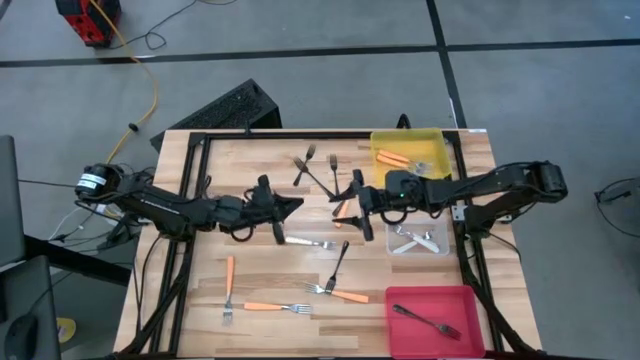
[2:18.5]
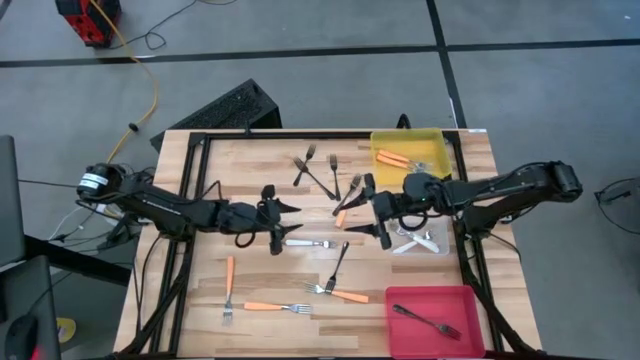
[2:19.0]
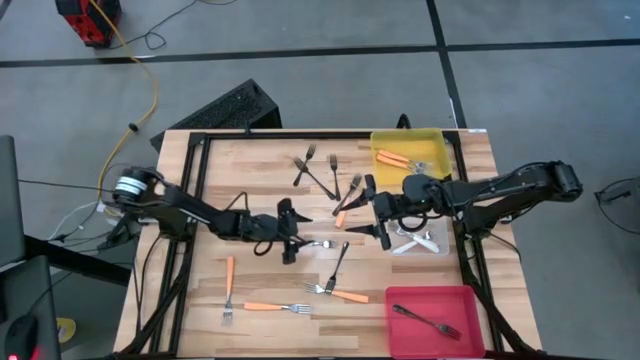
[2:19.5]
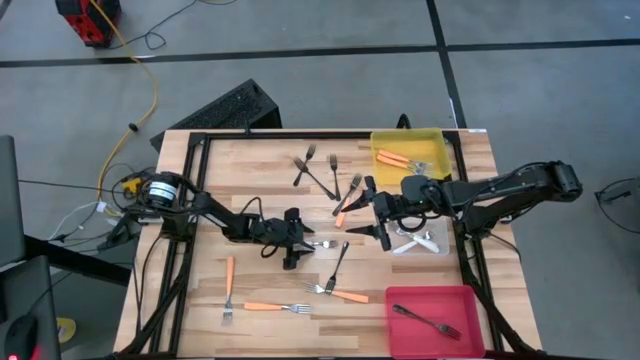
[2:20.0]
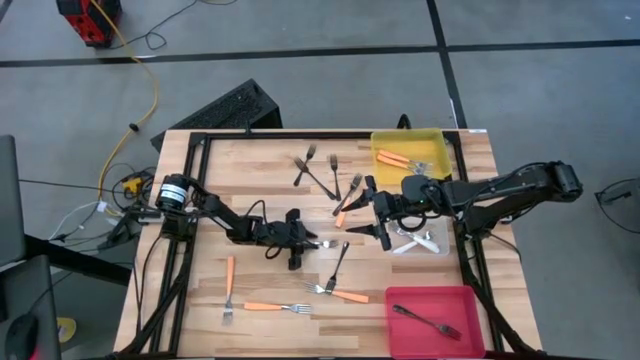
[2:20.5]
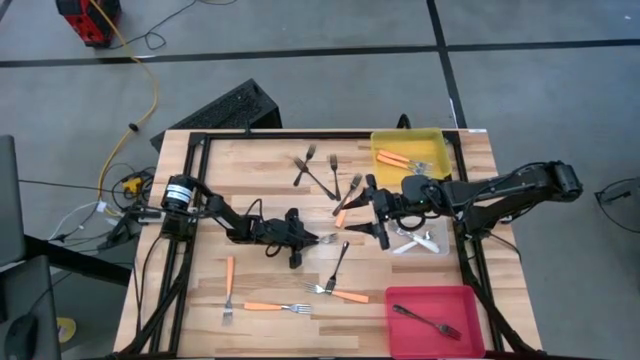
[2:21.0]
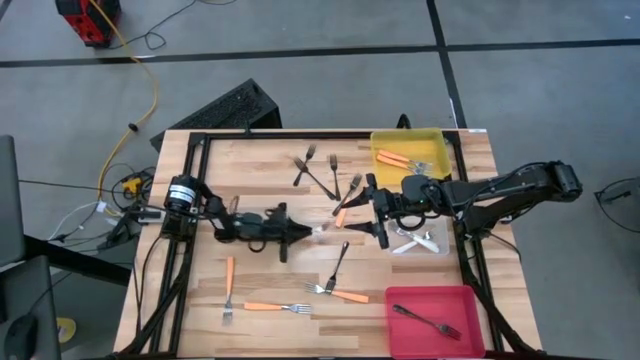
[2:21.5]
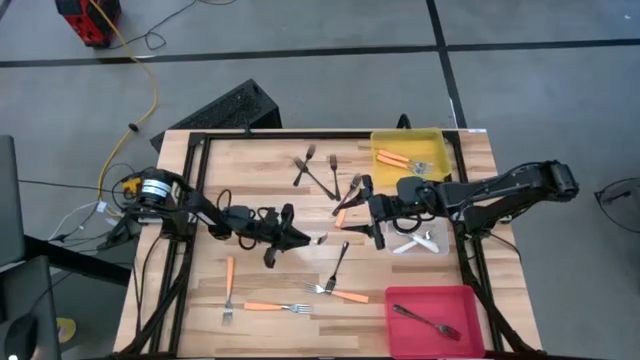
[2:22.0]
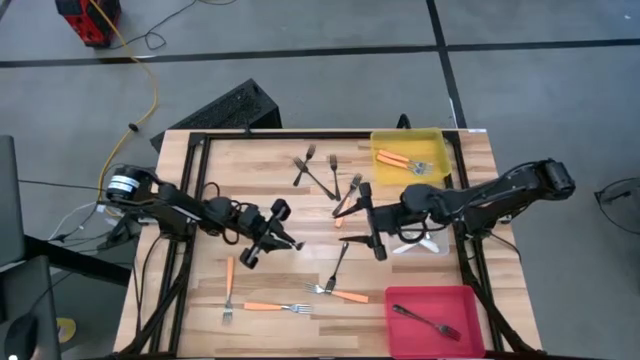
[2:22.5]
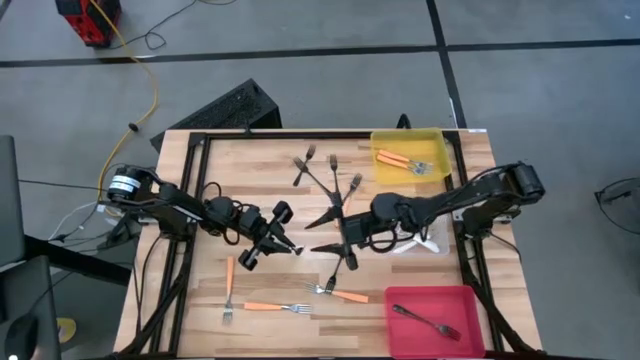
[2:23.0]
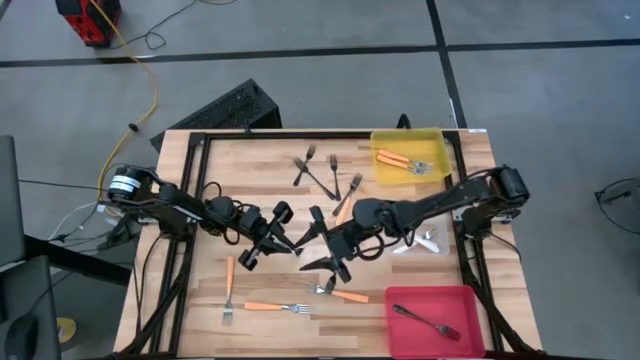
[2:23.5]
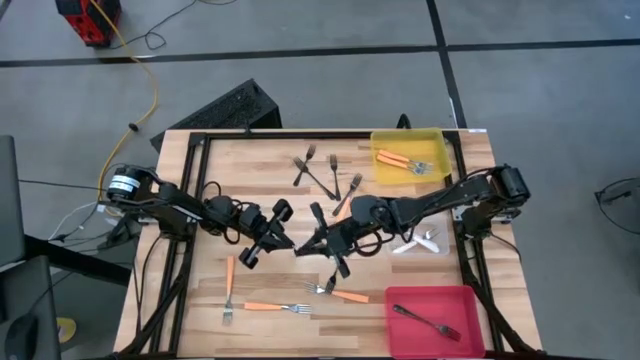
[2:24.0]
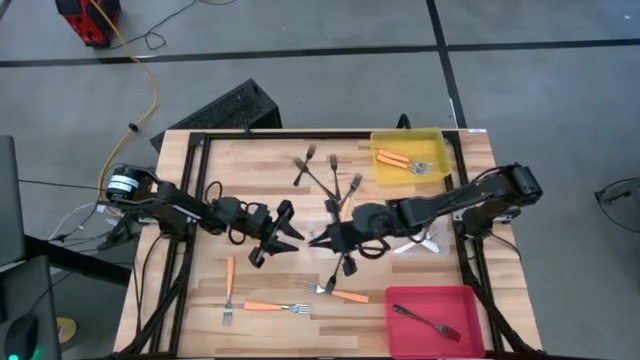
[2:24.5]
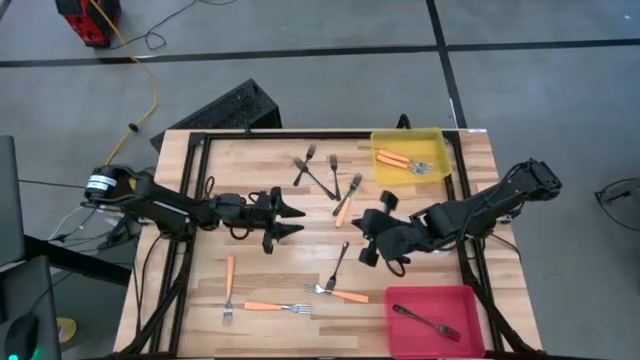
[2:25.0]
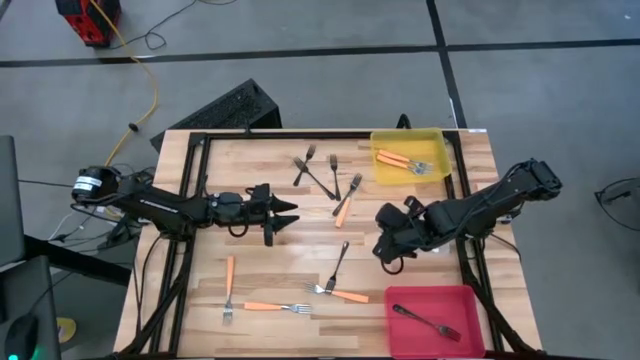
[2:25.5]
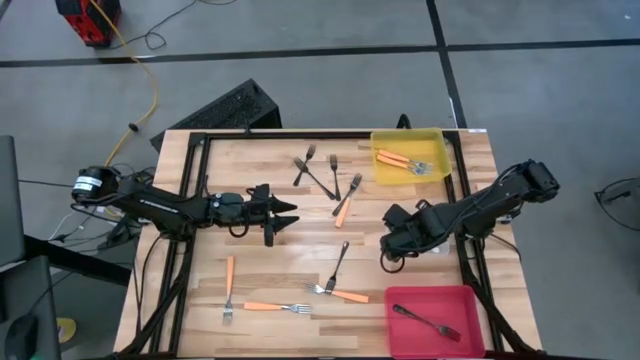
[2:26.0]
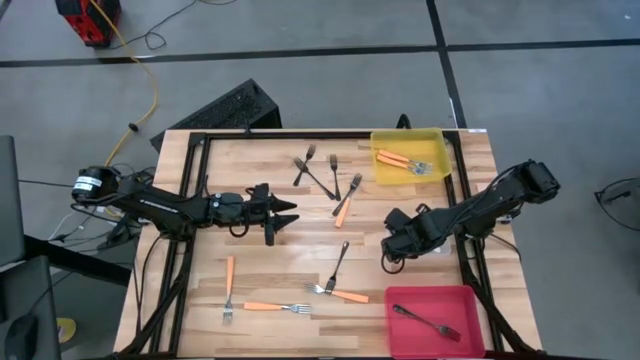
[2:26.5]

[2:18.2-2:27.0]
Task: Sort silverware by color (type)
Put the white fork into the transparent bin

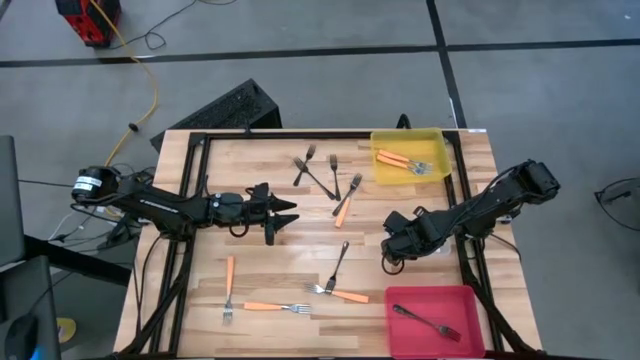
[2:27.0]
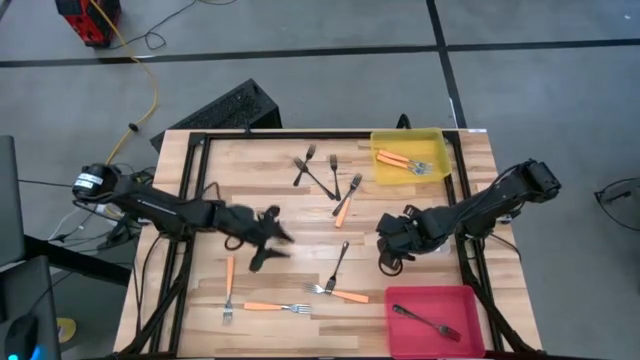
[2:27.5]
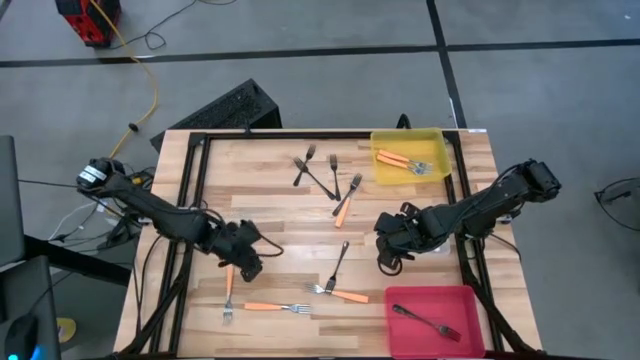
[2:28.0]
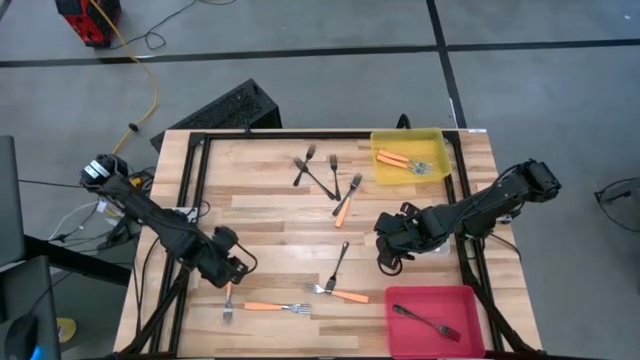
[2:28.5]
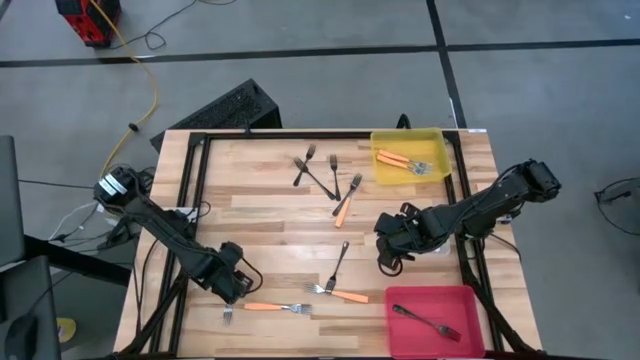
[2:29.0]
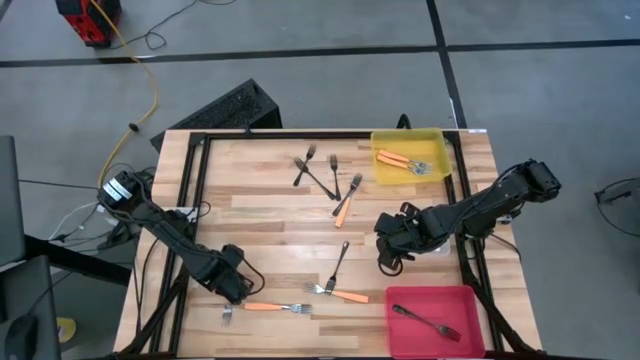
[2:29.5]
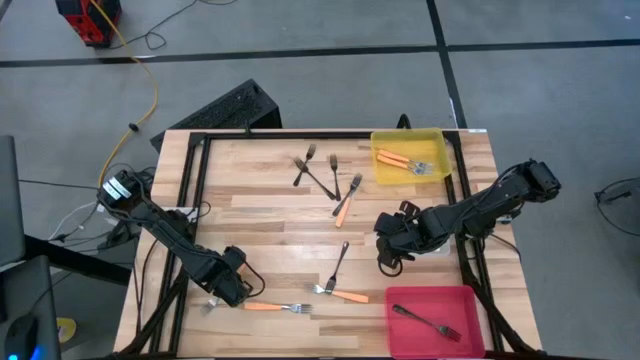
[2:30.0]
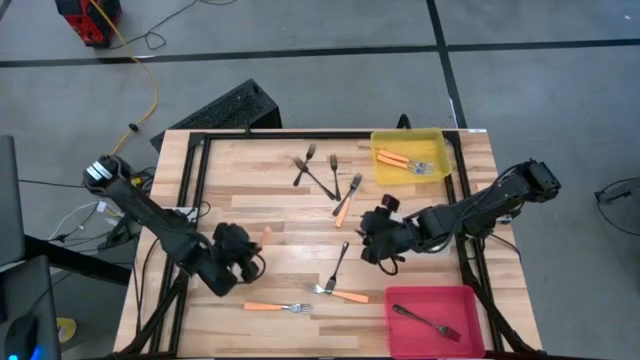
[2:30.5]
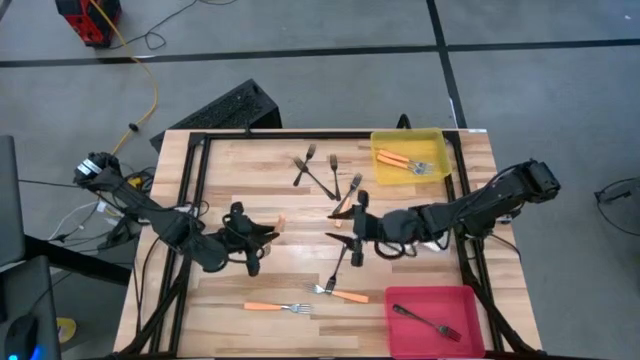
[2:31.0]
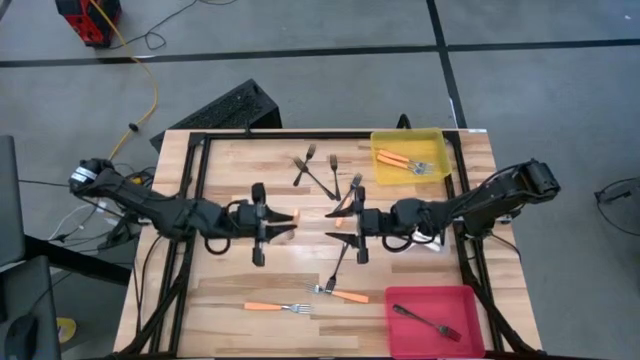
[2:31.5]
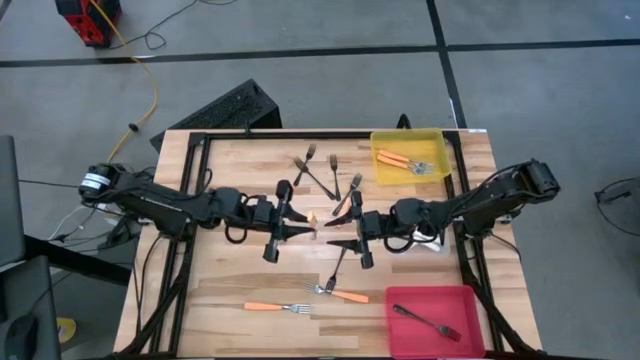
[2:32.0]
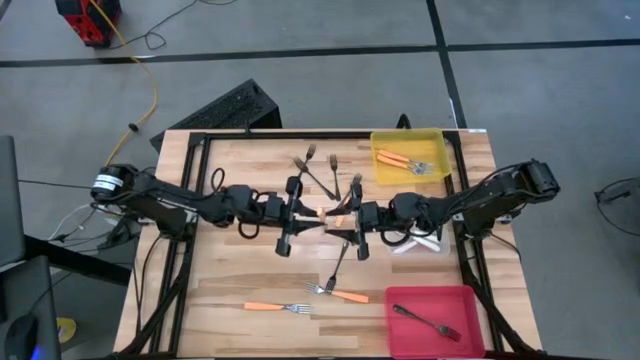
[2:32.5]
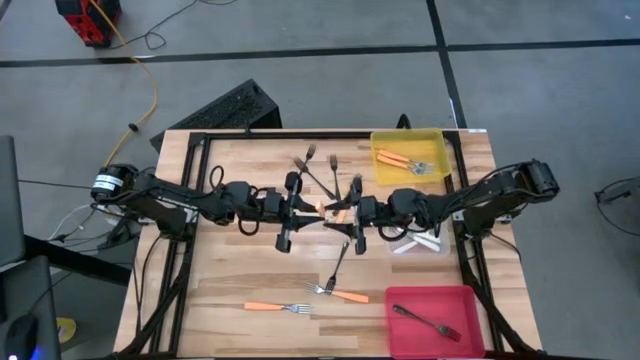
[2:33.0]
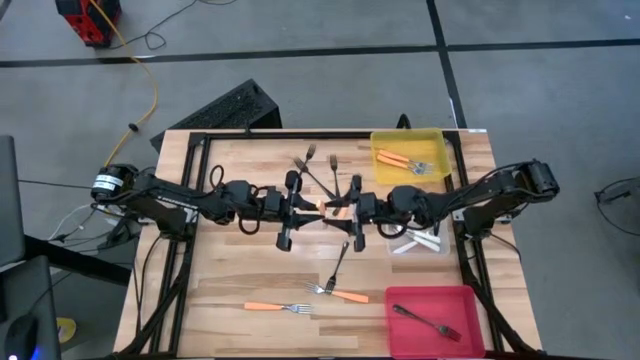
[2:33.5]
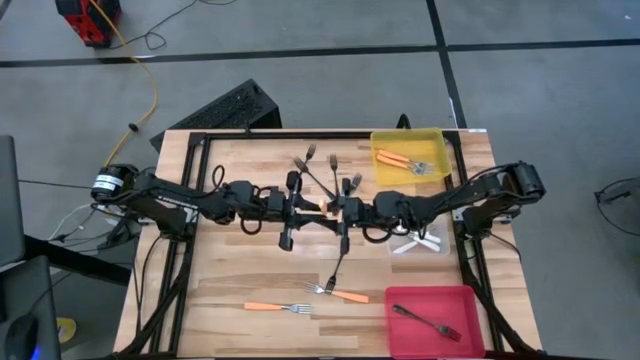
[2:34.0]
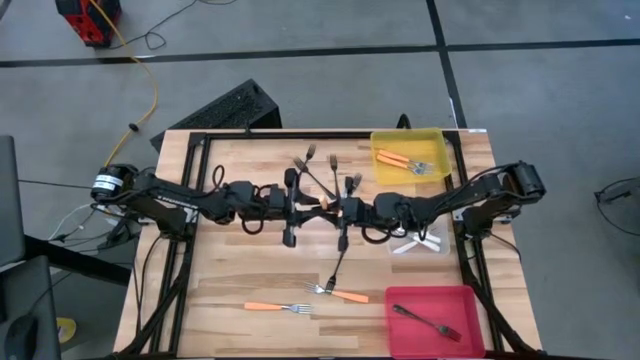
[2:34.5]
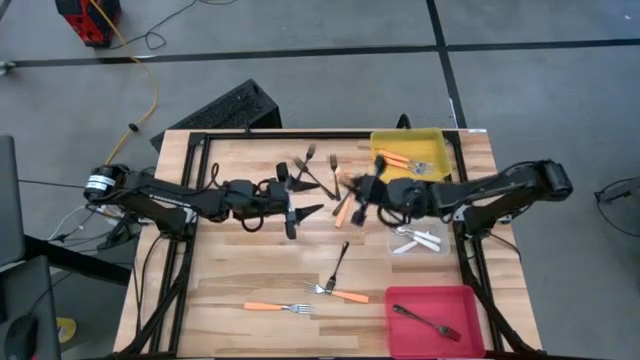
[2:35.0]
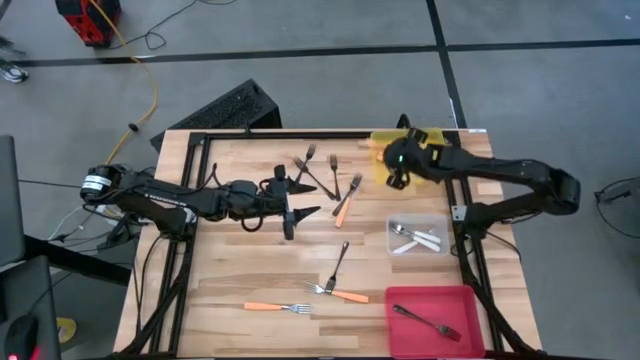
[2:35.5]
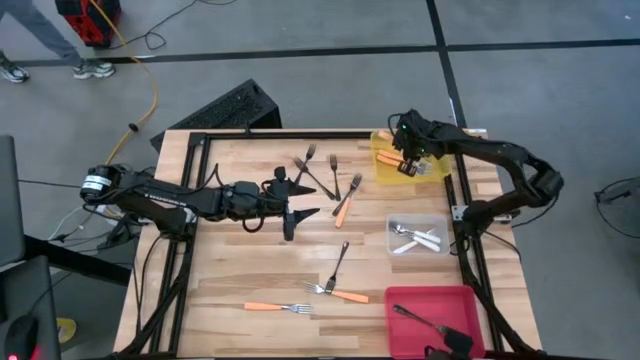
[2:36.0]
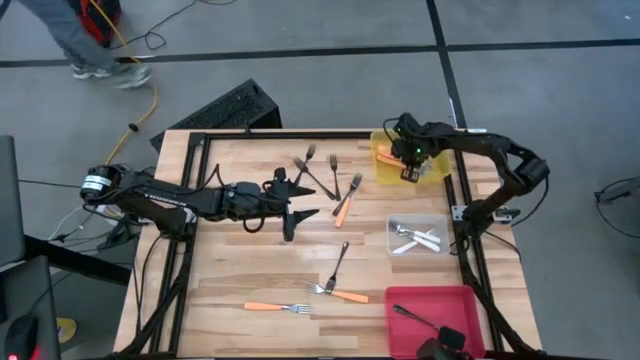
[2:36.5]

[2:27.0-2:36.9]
Put the orange fork into the yellow bin

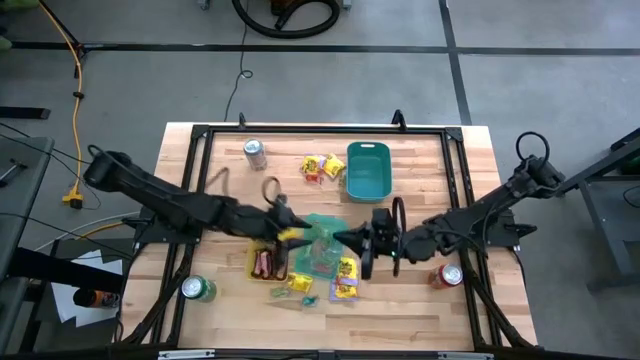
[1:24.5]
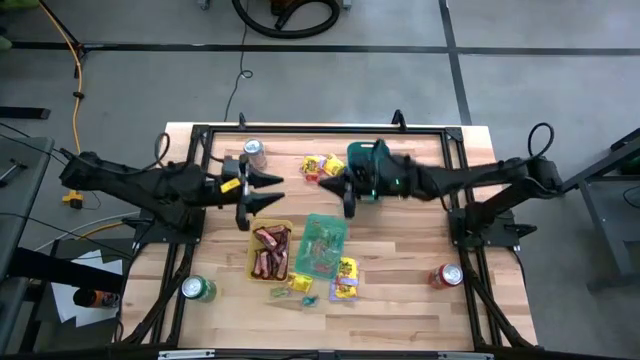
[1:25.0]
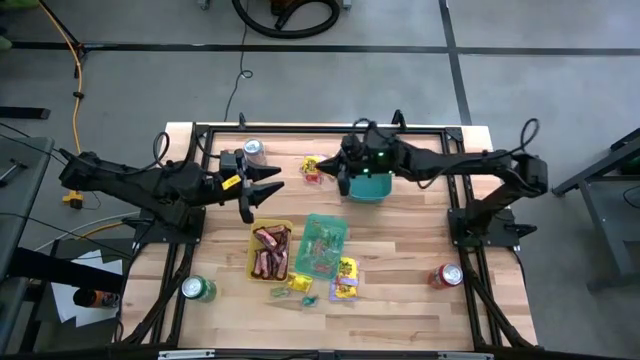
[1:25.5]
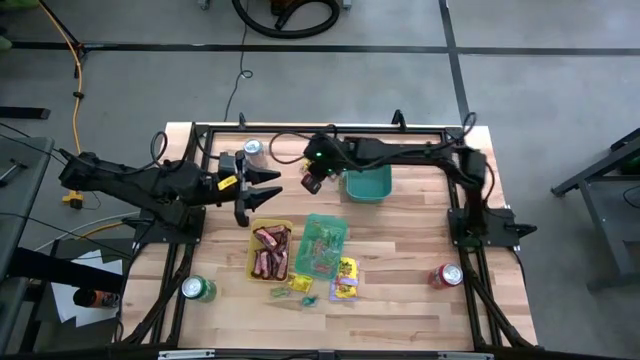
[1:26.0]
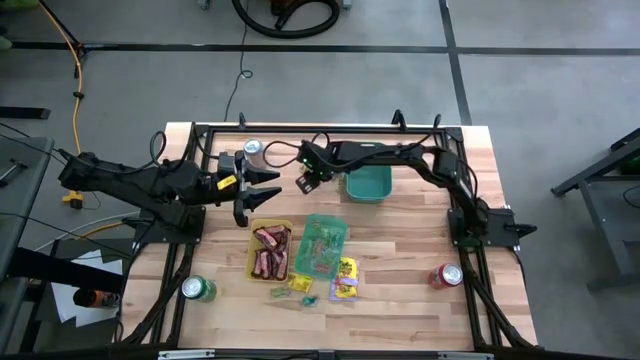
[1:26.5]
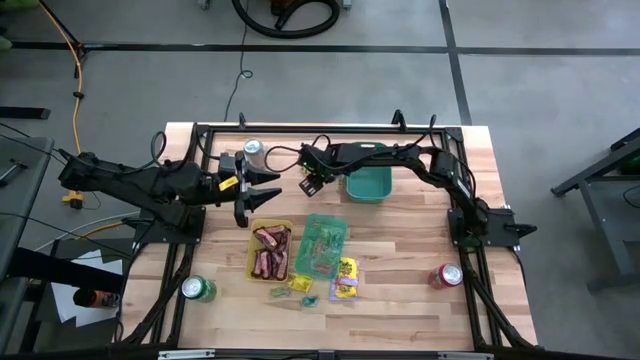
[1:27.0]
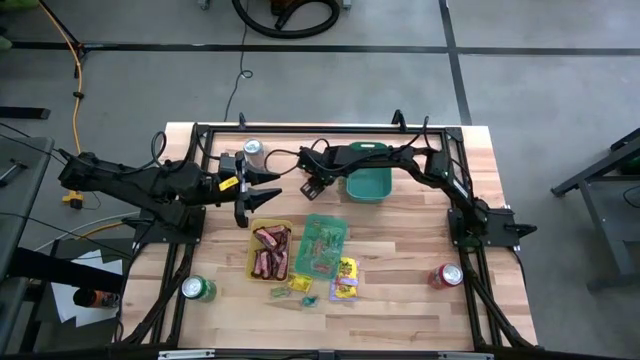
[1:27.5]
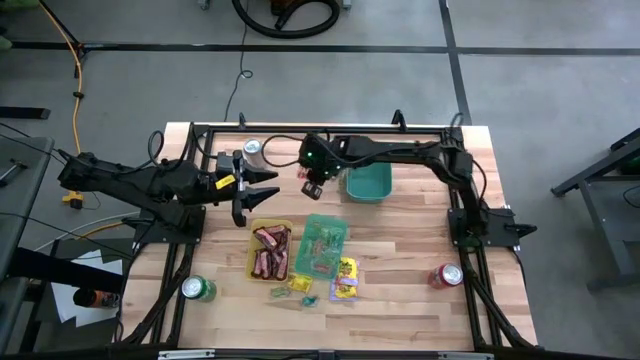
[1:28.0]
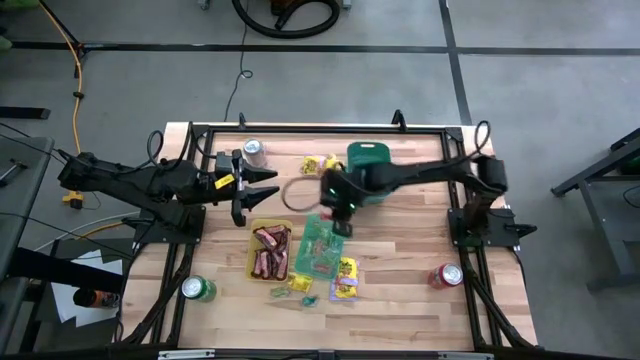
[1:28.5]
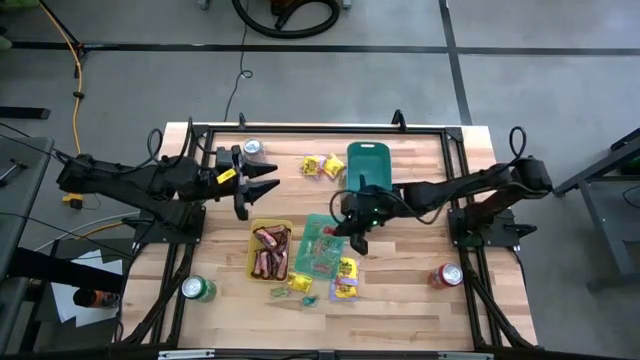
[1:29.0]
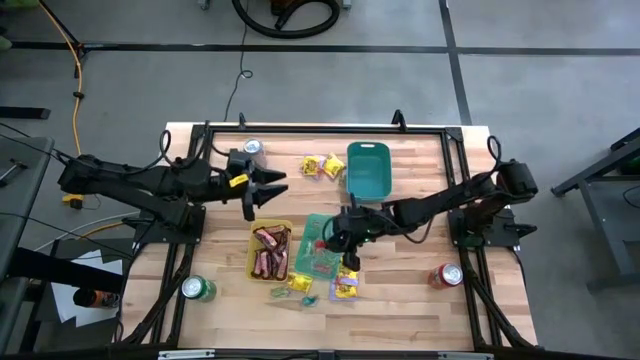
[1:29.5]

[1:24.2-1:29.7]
Task: Sort candy
Put the red gummy into the light blue bin
